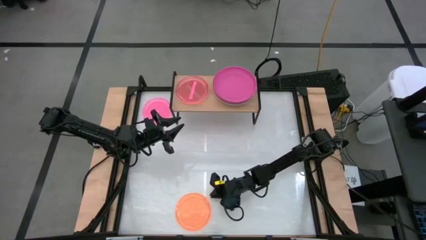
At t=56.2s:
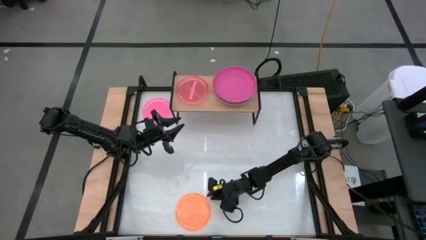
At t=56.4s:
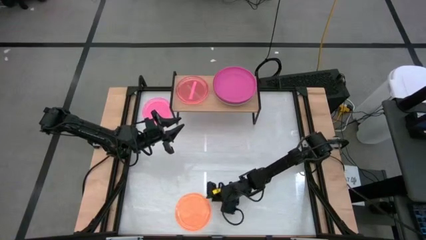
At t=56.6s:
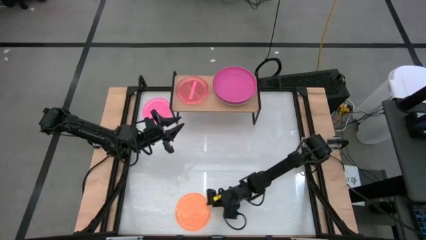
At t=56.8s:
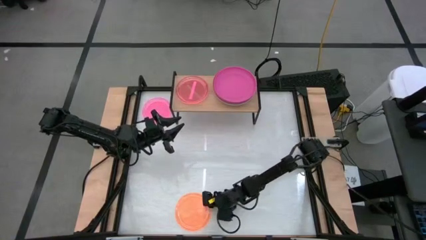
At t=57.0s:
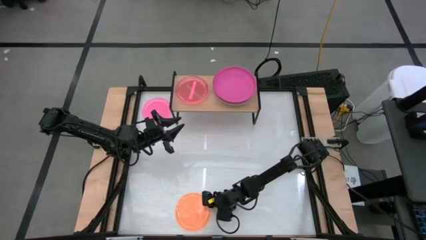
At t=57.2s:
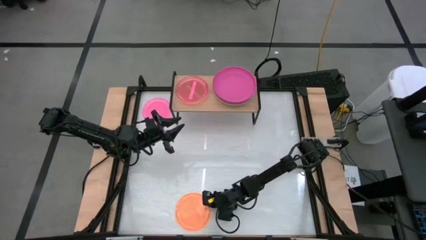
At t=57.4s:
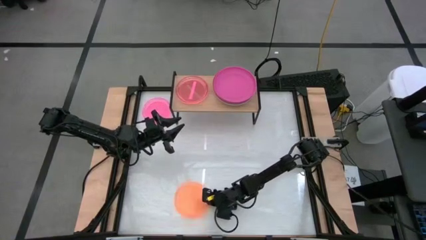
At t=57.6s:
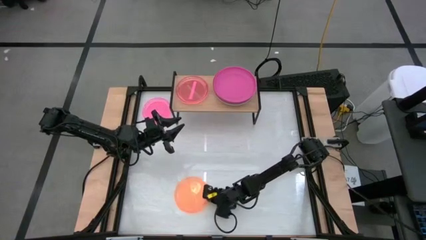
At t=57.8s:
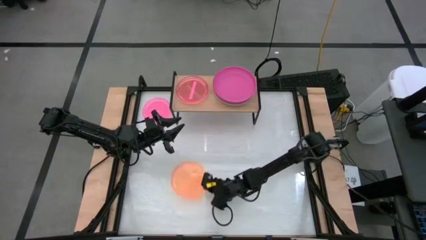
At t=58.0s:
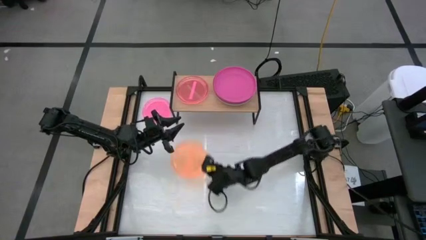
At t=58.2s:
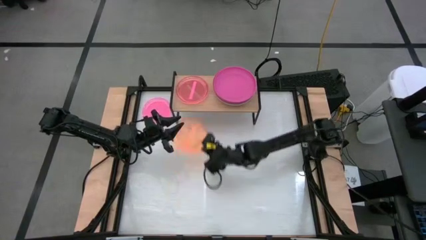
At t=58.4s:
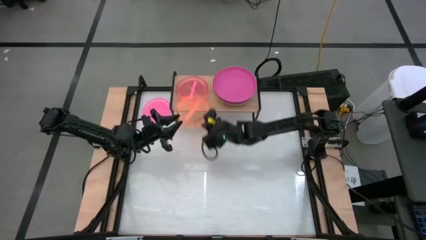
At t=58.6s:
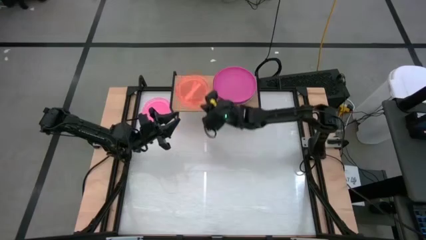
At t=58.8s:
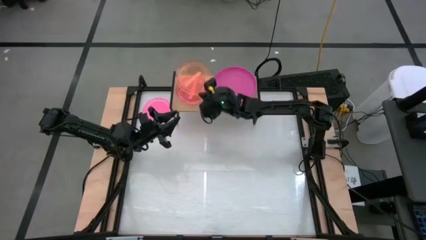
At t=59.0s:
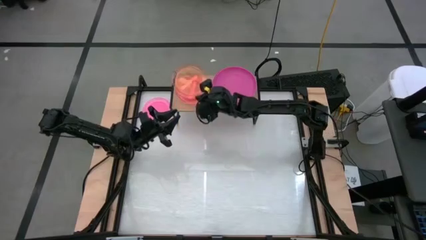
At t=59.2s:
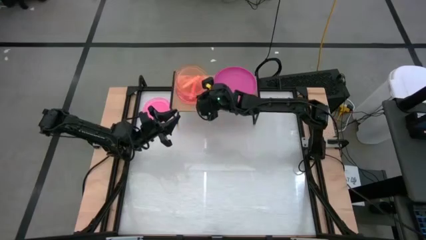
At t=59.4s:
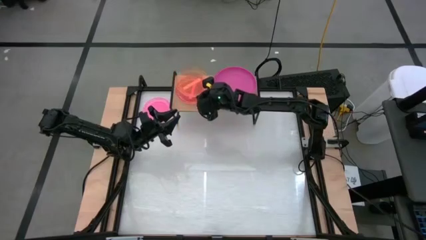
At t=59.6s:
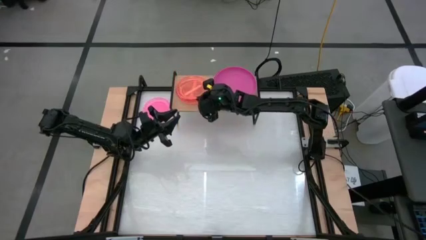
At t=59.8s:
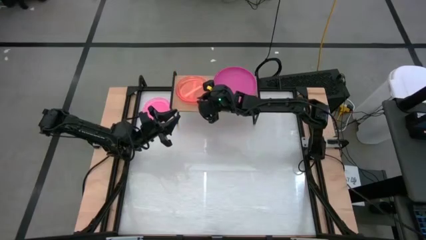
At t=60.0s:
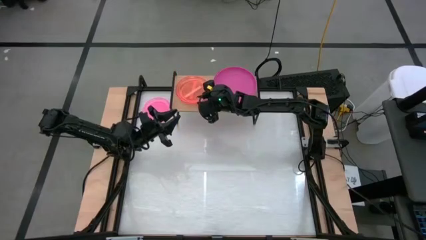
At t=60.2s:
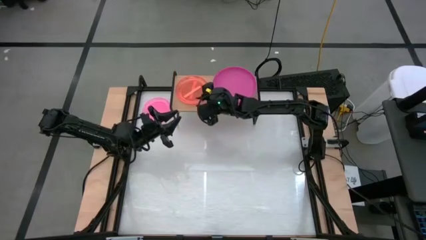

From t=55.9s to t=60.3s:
Task: Place and stack plates onto a shelf
Stack the orange transparent plate on top of the pink transparent plate on the shelf

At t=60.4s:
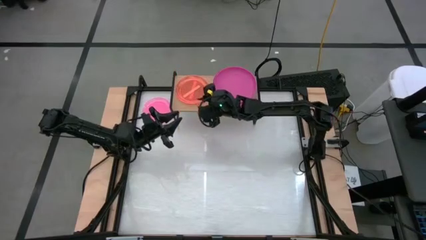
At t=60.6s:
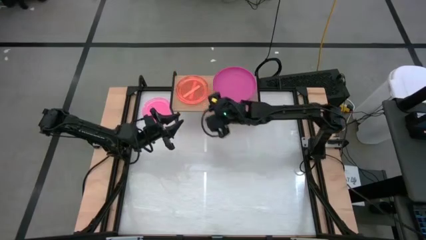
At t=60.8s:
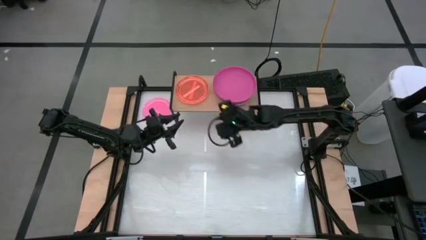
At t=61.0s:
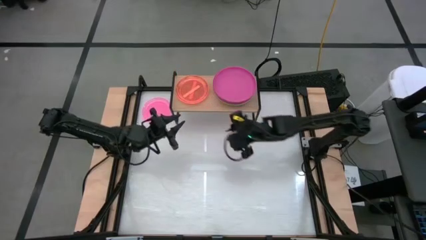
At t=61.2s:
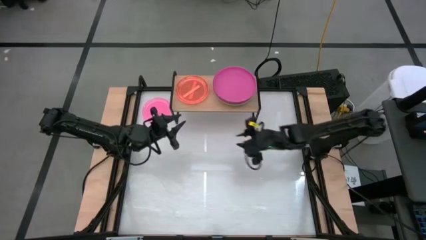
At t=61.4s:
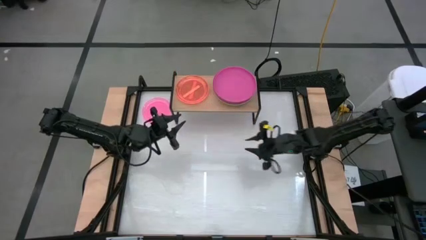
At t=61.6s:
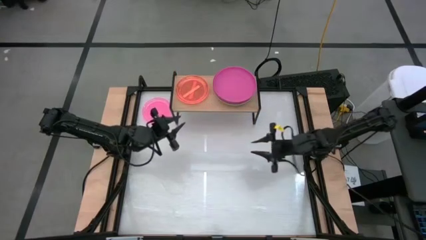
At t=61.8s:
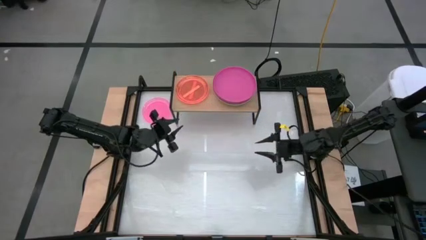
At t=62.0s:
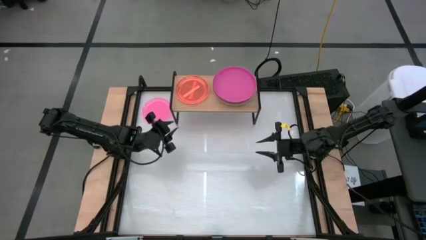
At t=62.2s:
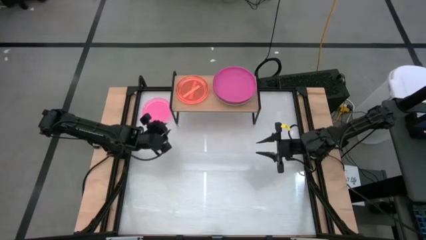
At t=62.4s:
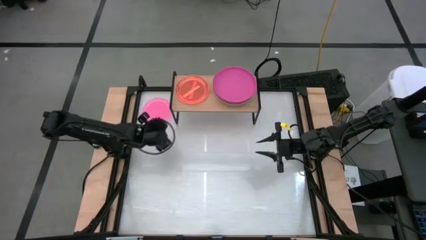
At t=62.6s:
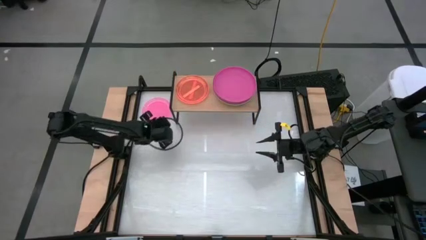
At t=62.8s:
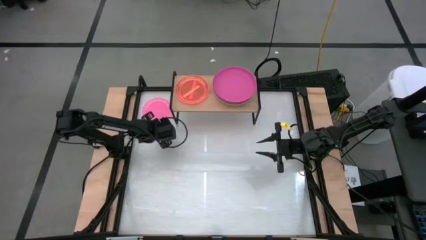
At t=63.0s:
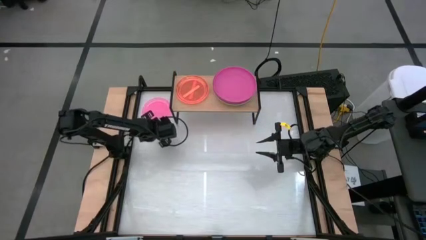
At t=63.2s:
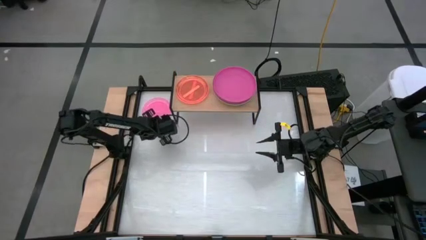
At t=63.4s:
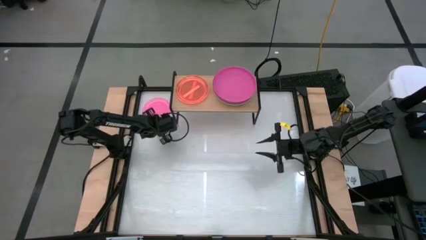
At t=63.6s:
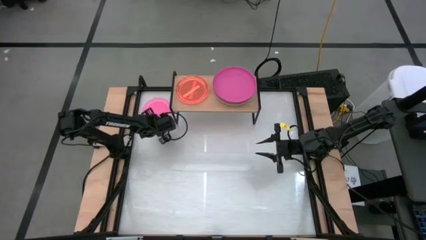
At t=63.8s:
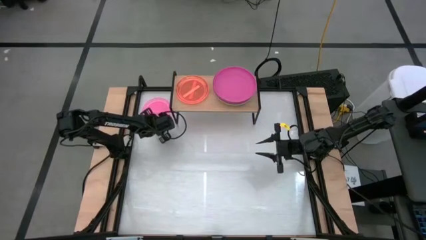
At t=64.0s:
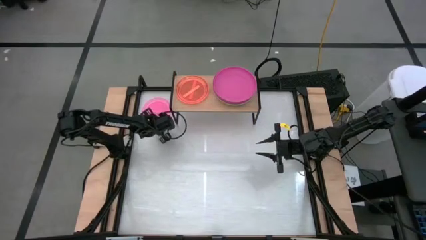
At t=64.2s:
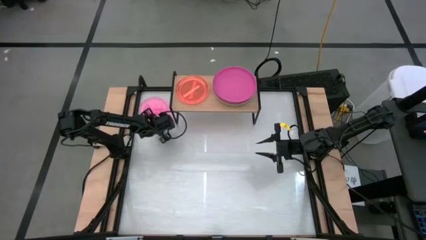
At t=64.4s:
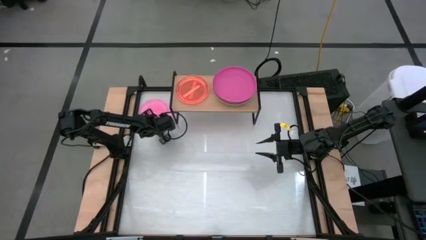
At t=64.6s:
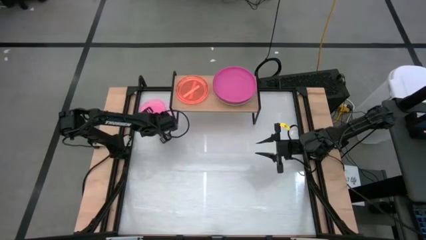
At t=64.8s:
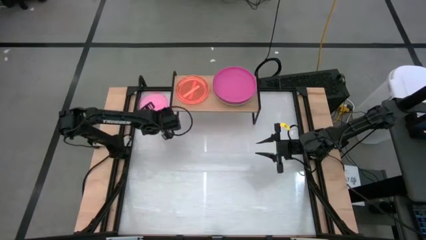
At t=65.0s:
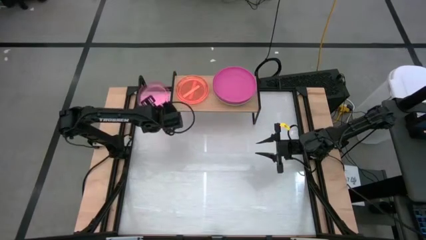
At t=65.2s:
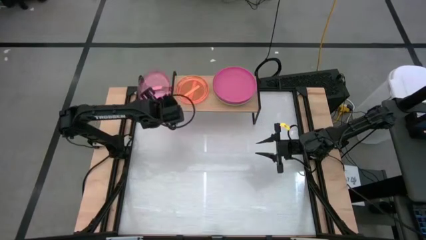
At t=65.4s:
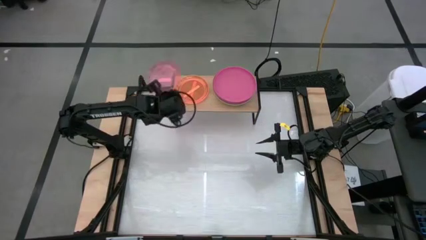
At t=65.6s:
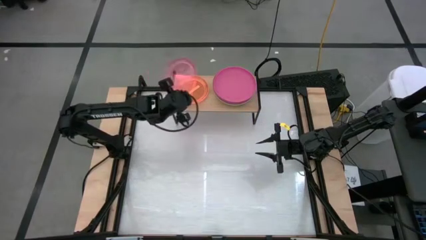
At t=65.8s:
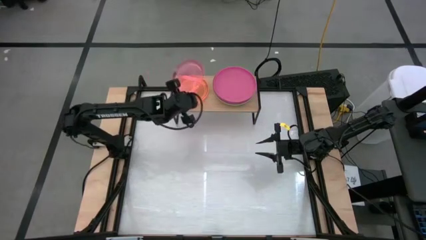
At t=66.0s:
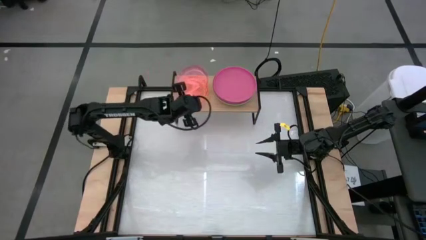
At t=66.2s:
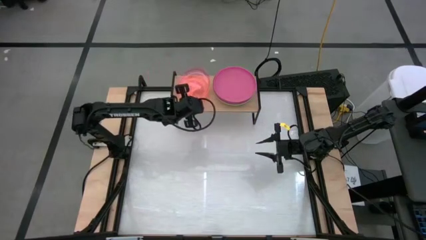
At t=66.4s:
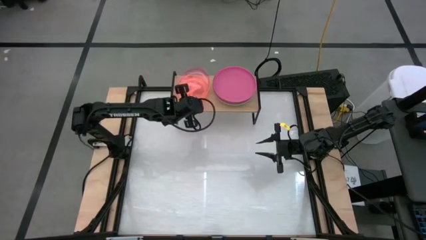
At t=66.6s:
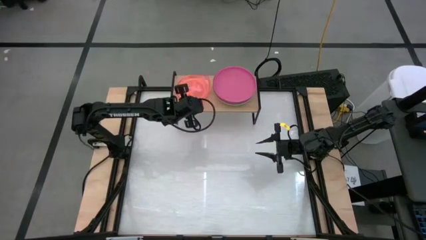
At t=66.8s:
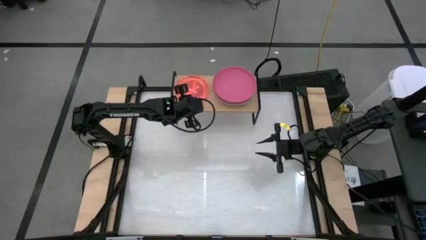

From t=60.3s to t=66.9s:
Stack the pink transparent plate on top of the green transparent plate on the shelf

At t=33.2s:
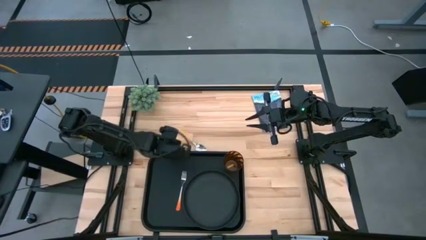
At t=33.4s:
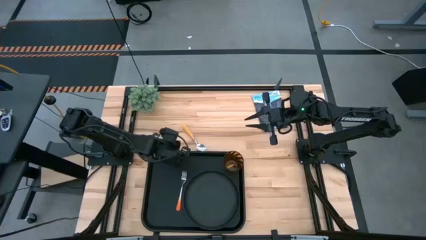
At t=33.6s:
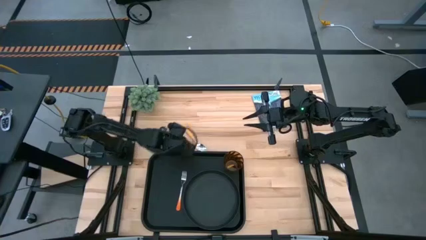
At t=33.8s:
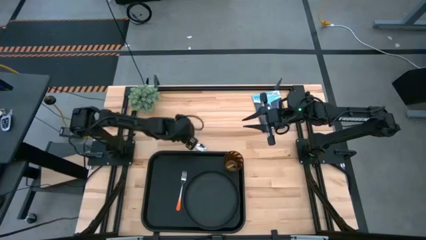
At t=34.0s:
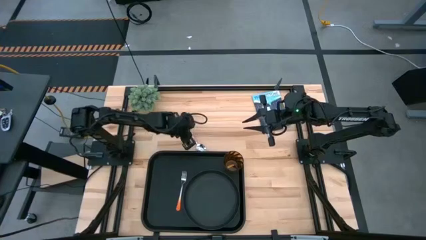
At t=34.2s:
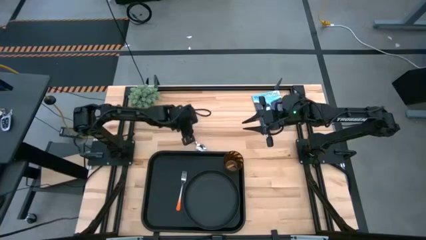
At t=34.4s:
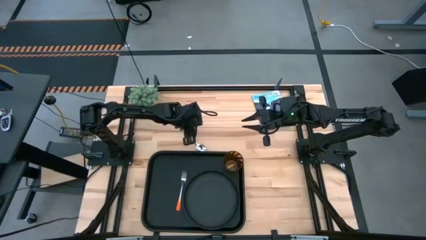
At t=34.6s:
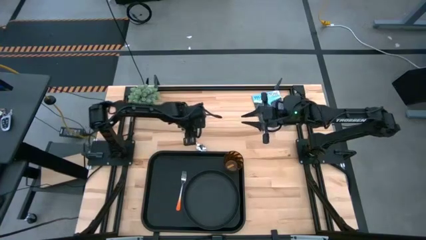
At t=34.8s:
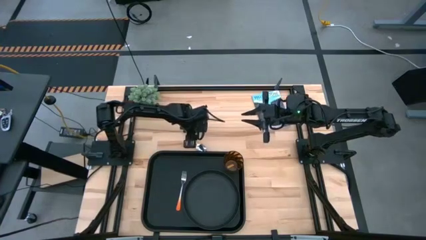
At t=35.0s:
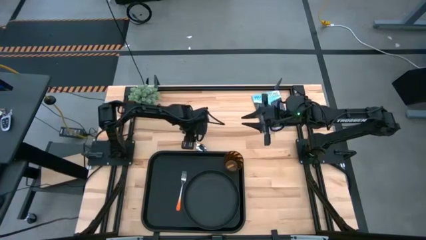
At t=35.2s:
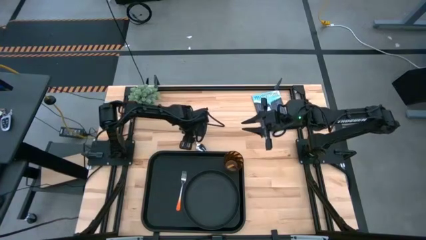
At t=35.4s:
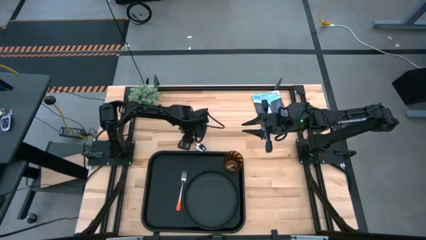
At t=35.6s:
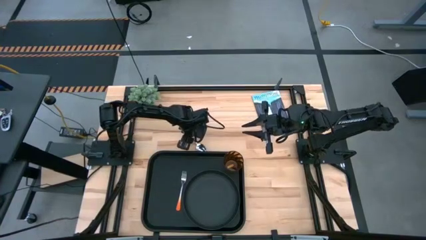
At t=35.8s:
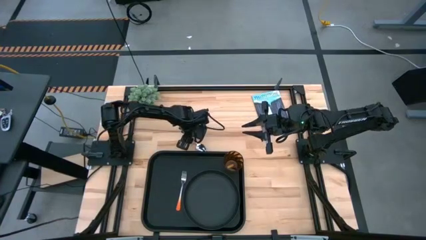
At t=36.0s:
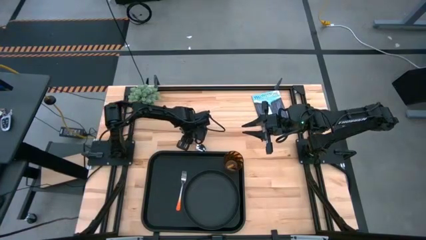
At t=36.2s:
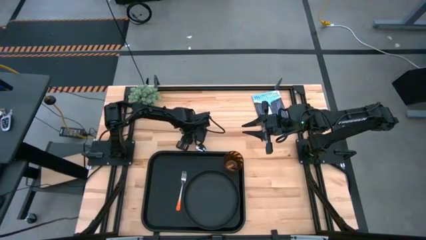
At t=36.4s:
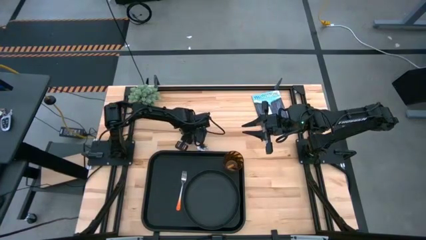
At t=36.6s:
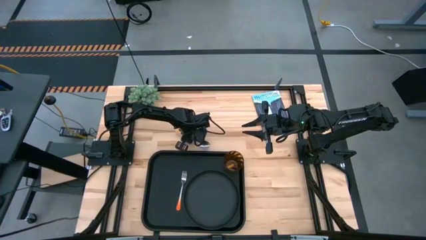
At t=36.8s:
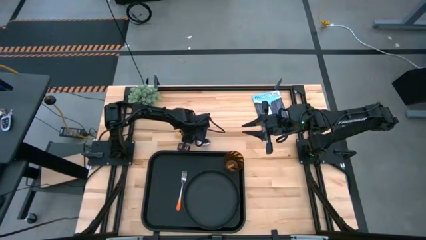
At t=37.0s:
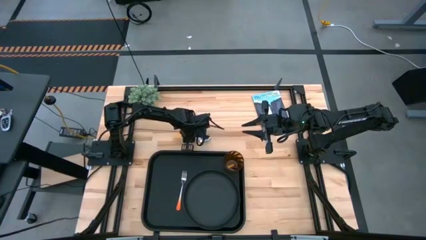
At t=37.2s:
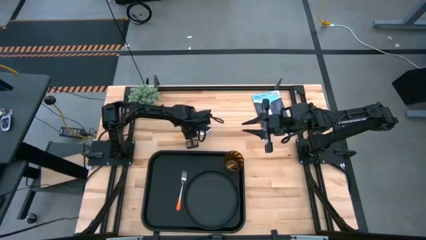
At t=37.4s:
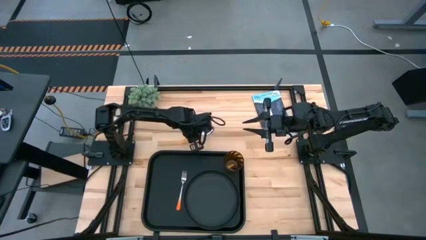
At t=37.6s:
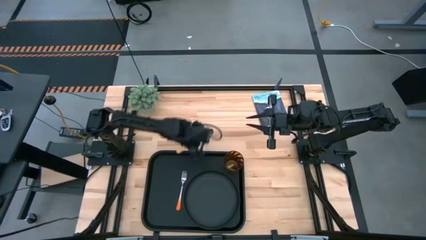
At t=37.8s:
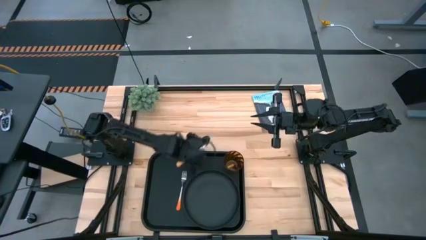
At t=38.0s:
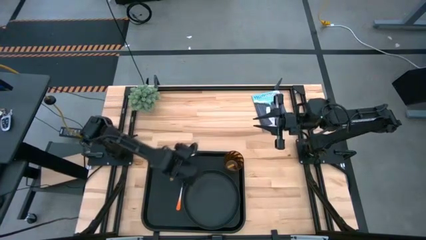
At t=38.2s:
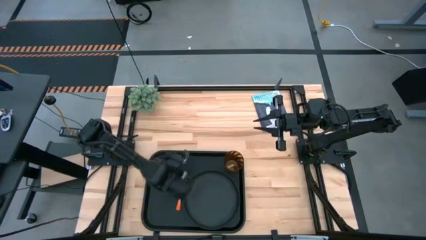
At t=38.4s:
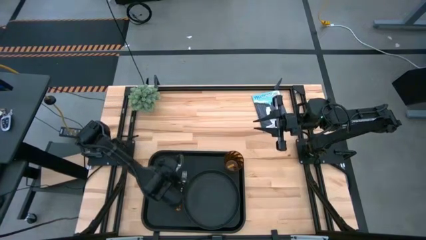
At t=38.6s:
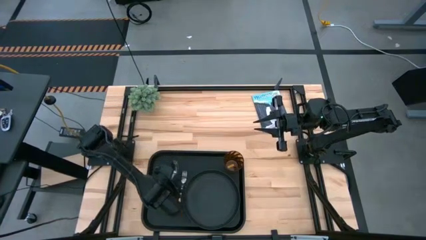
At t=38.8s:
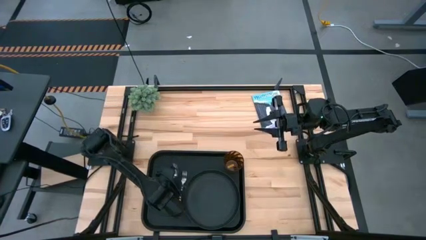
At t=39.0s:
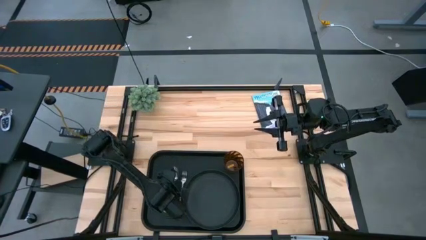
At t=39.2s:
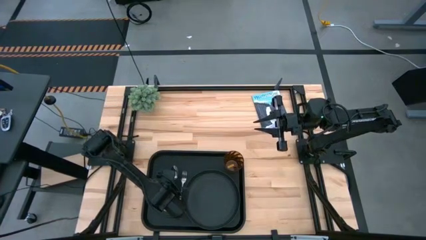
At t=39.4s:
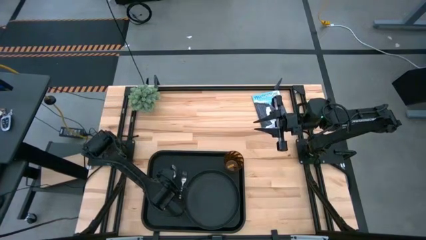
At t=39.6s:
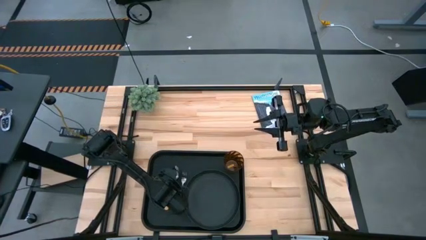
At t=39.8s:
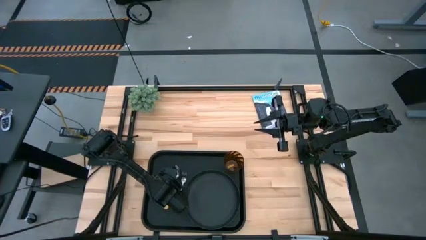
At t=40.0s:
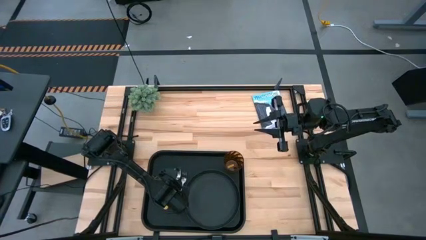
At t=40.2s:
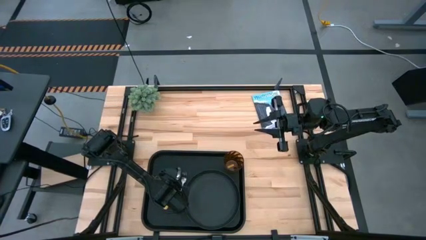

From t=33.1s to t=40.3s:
Task: Pick and place plate/cup/fork/spoon on tray
Put the yellow spoon on the black serving tray to the left of the orange fork
